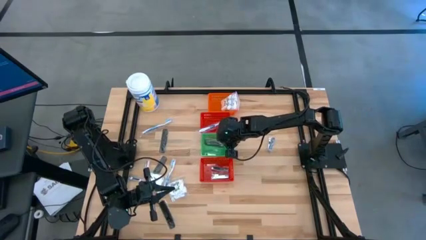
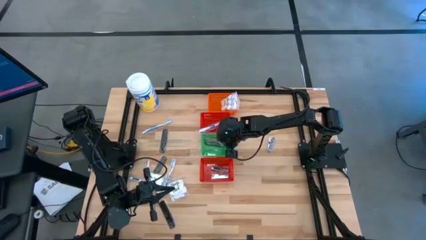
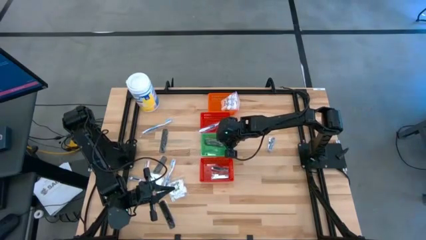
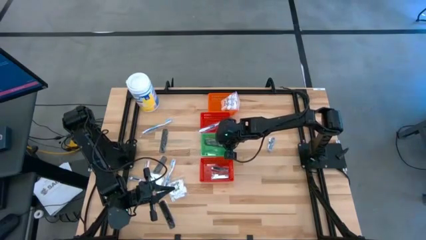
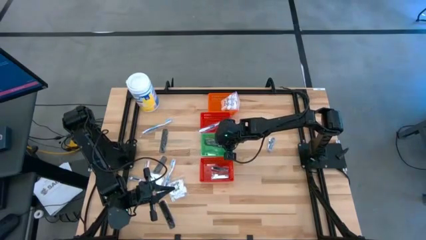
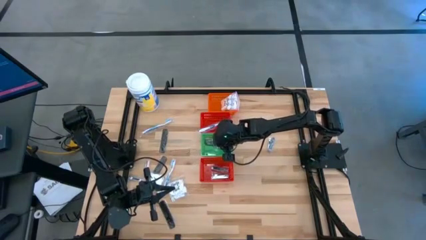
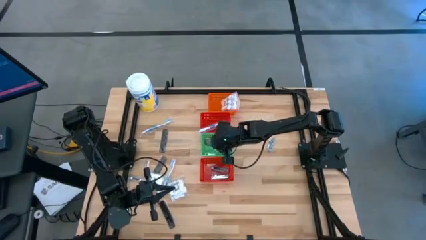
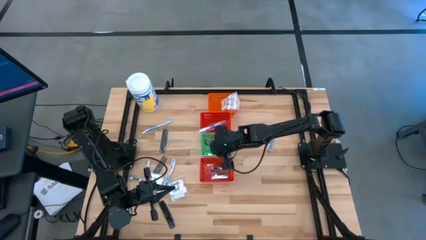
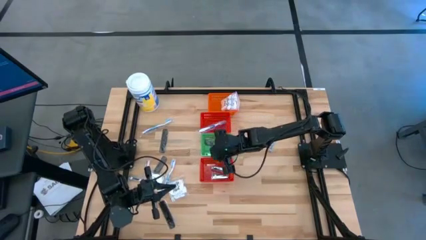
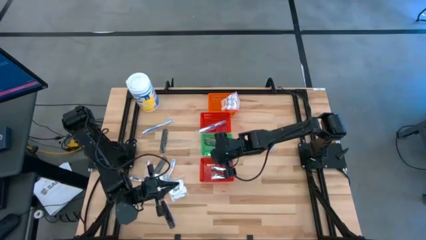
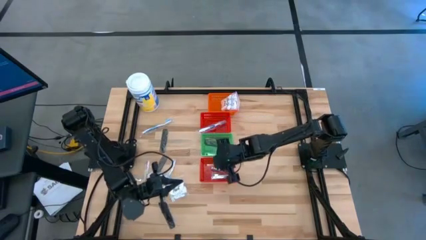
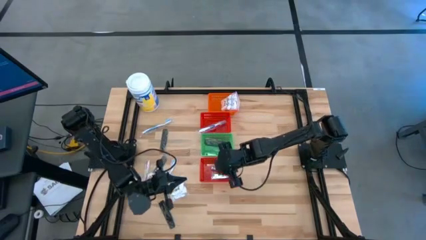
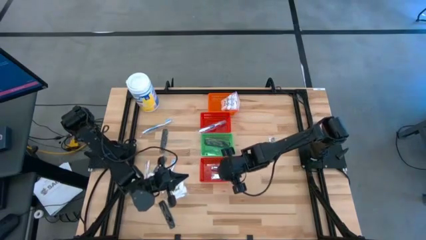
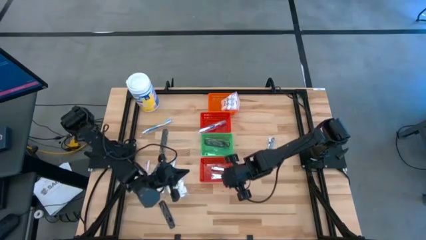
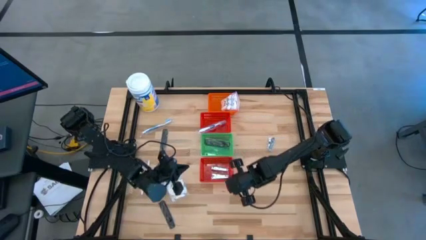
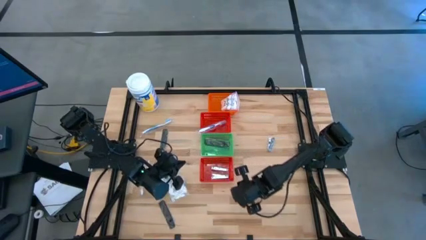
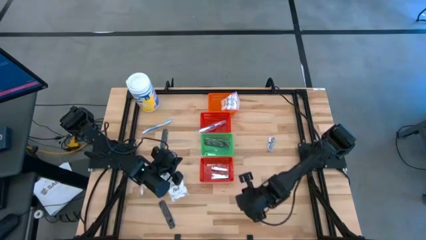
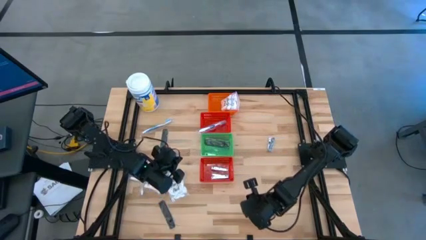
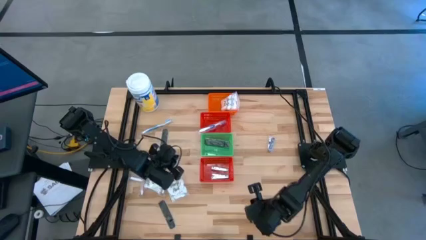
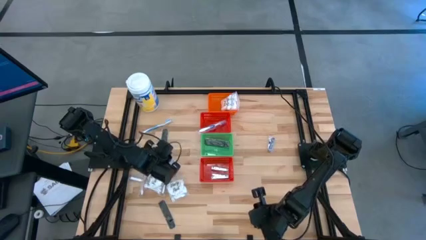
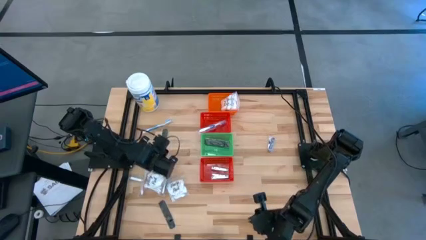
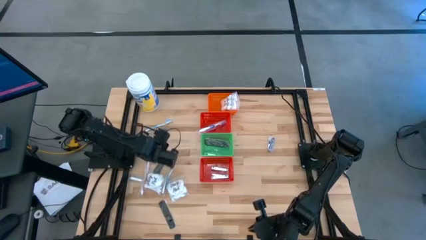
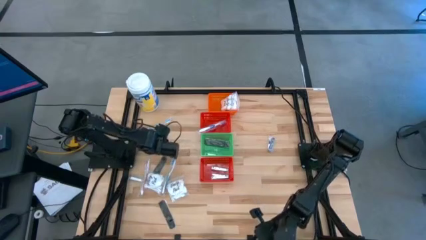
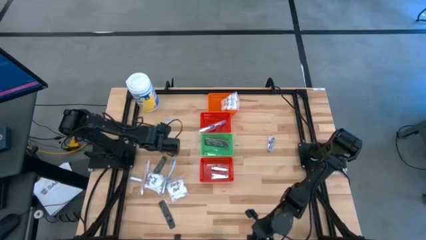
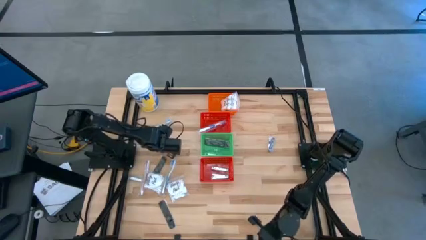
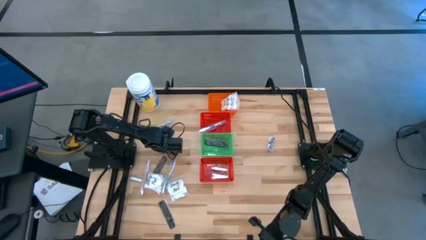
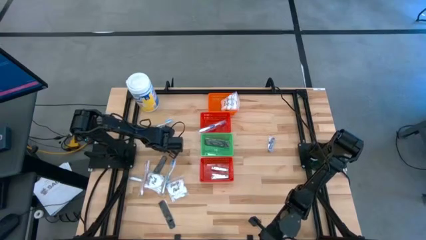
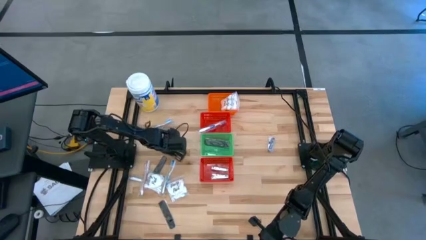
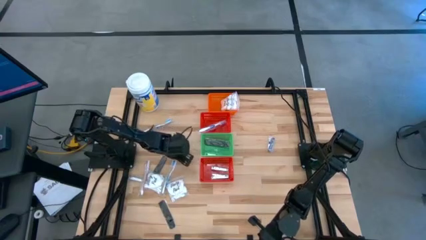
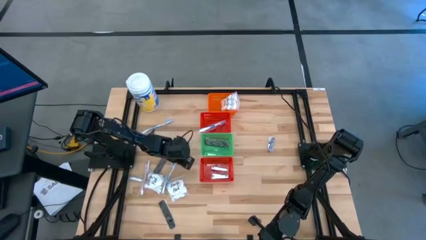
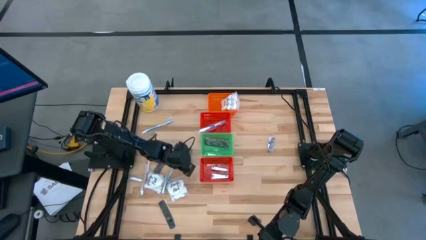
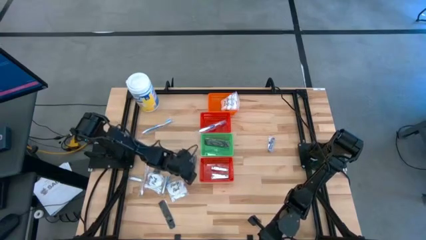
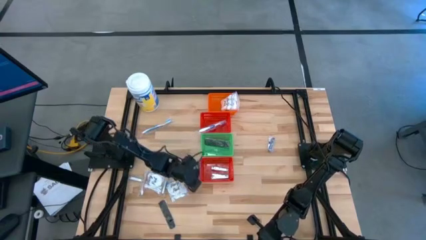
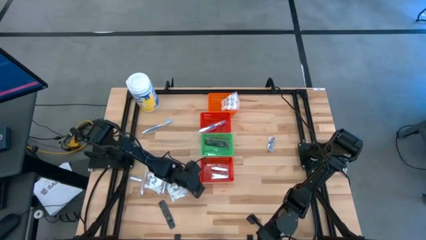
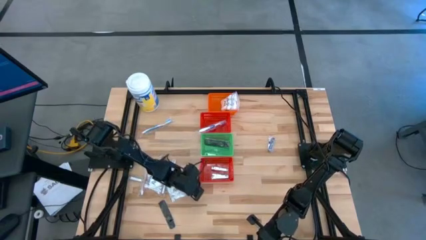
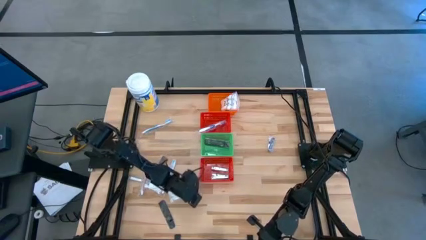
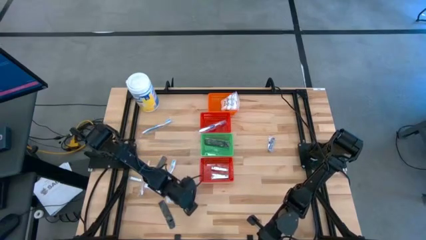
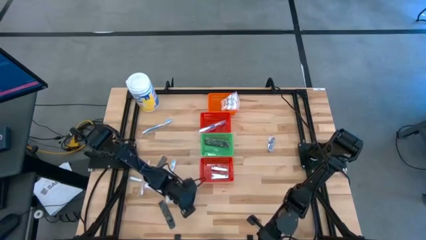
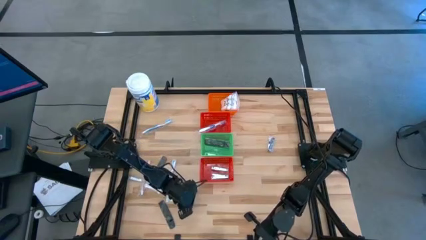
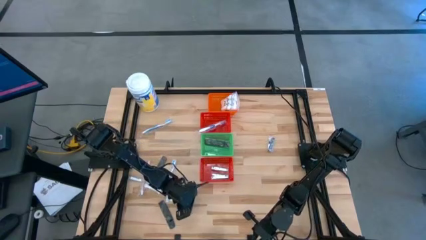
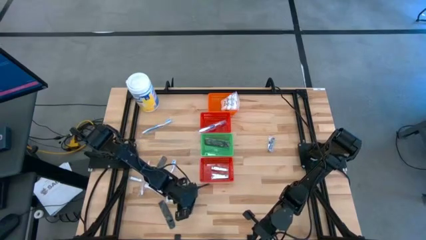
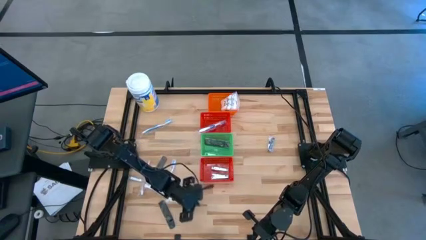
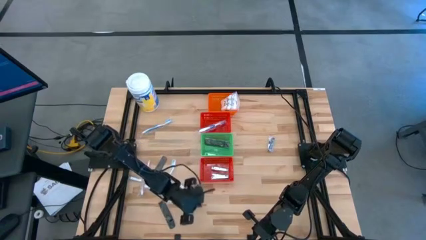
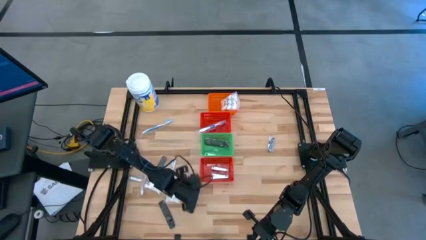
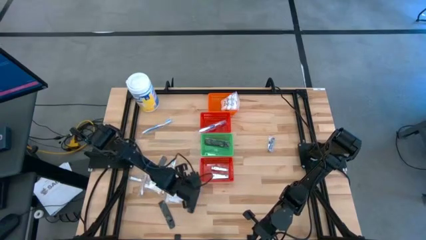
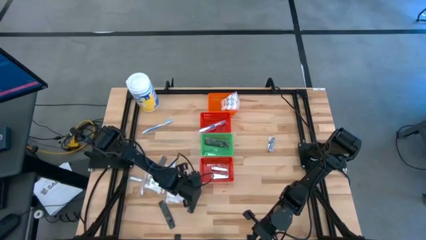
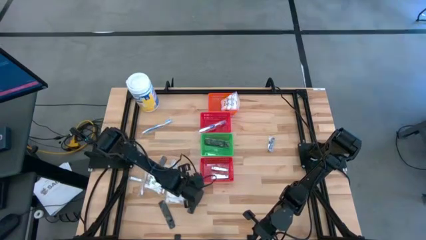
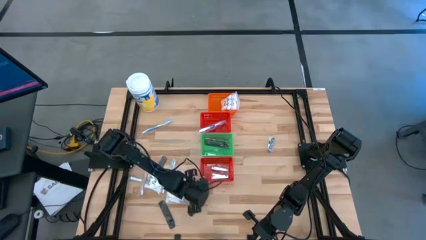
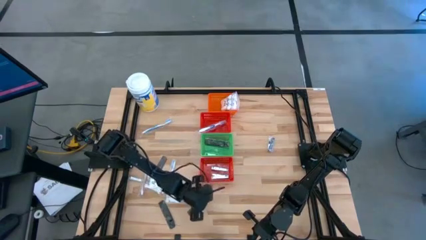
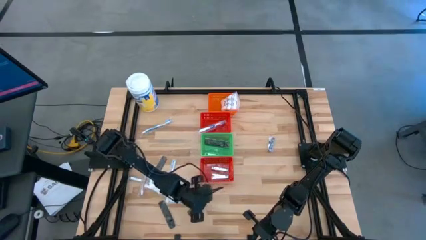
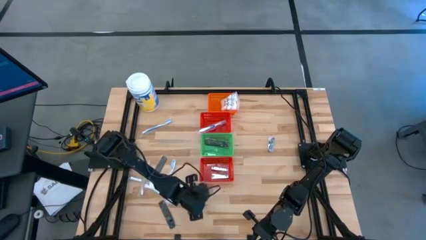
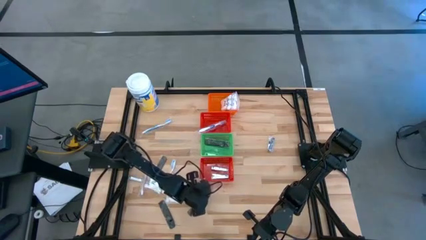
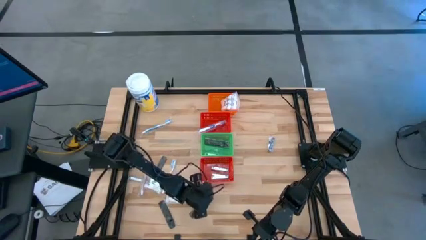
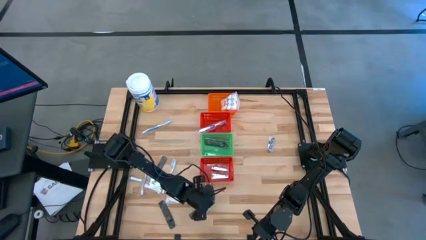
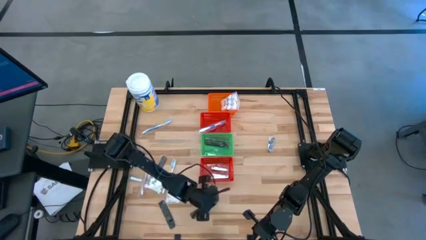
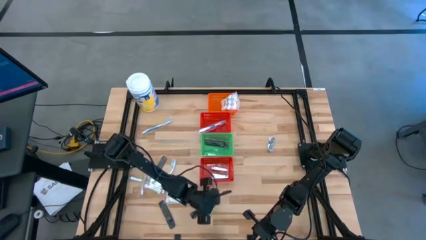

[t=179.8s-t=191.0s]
Task: Pick & Place Travel size toiletries
Put the black comb into the green basket

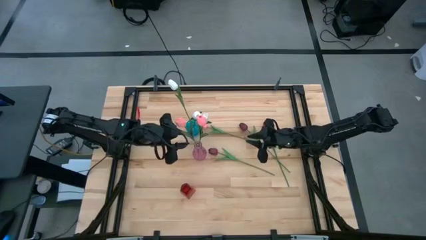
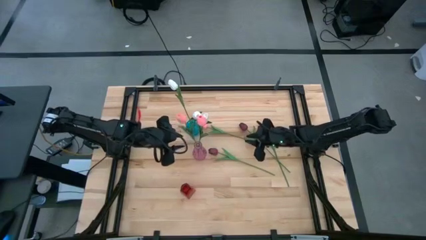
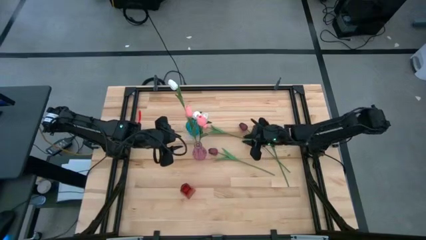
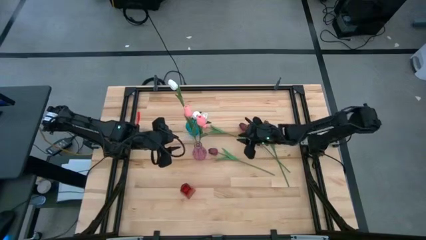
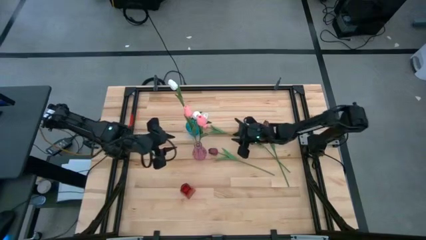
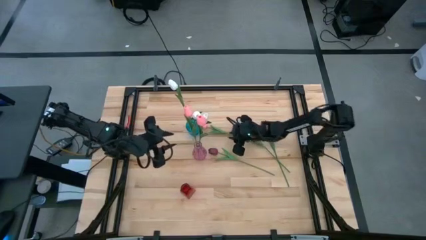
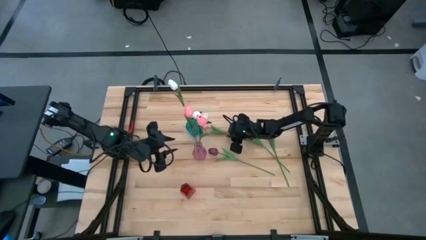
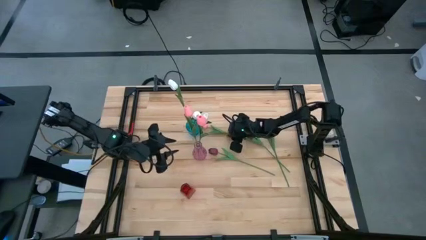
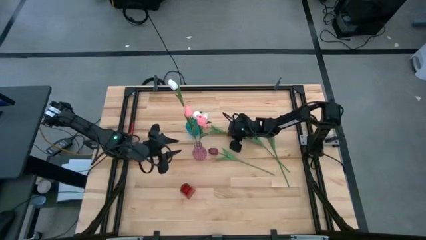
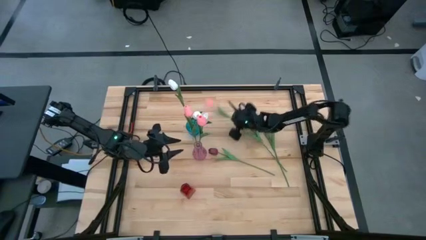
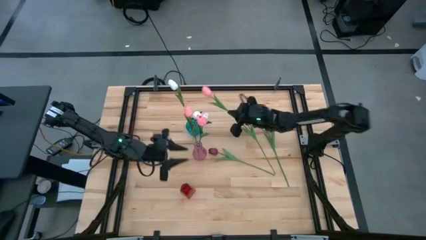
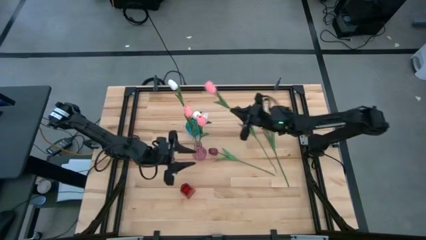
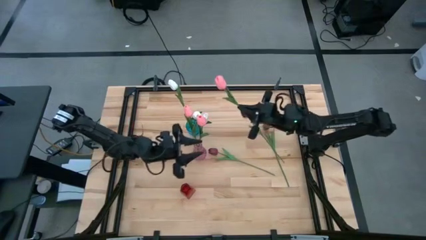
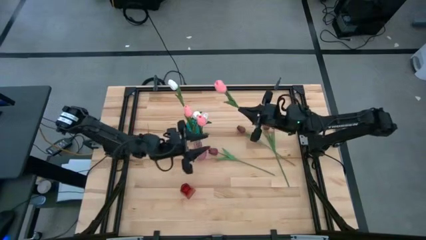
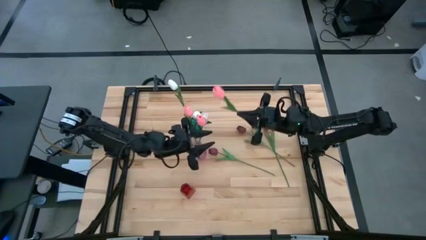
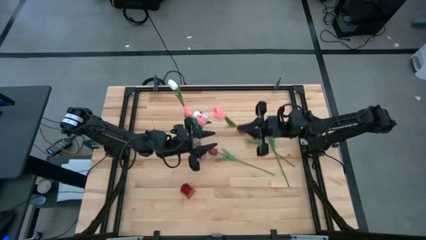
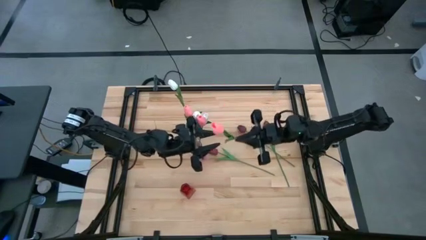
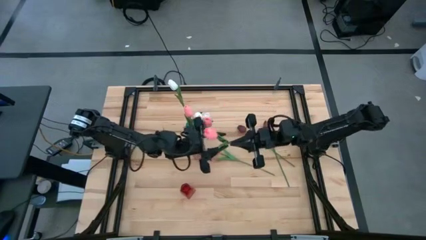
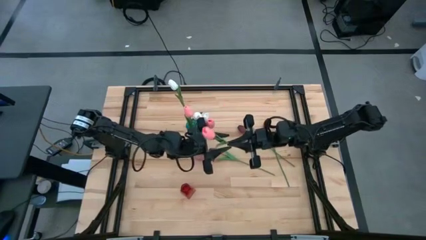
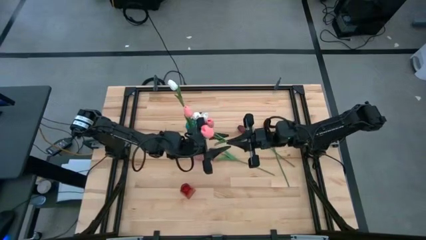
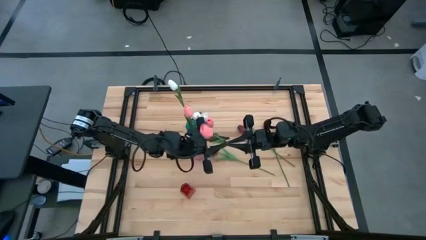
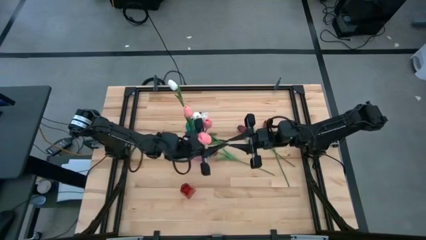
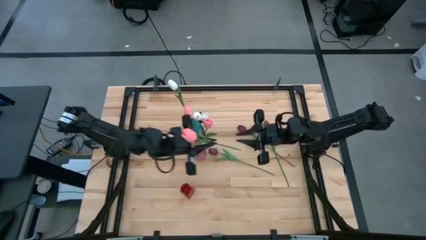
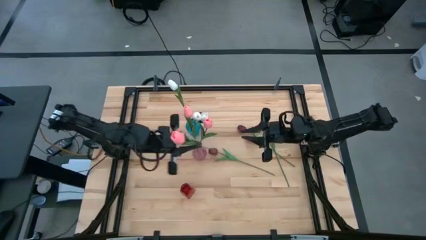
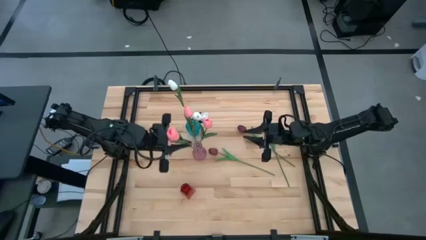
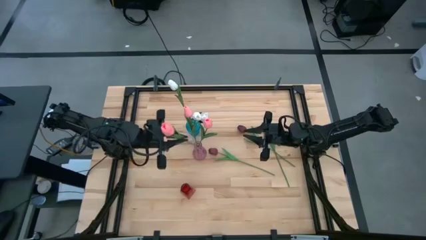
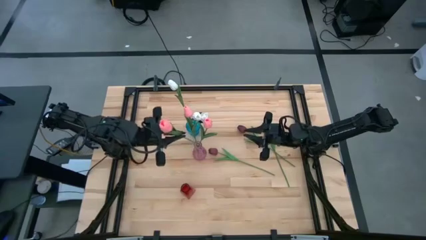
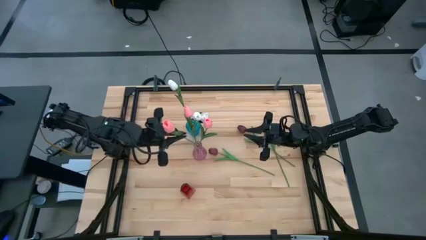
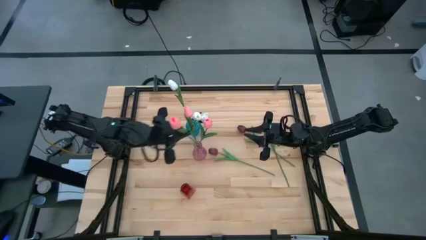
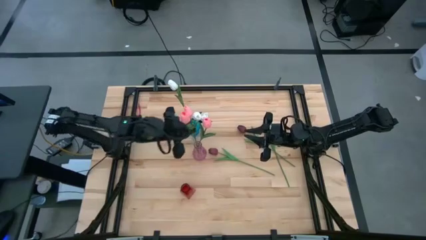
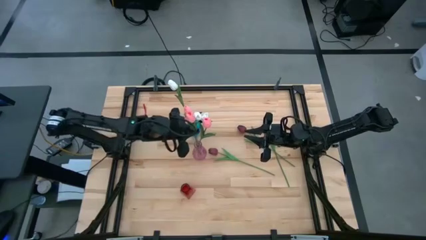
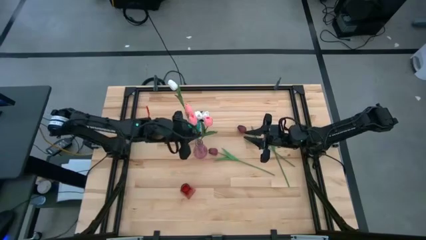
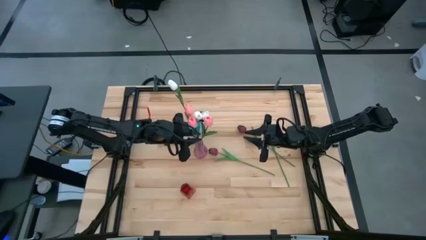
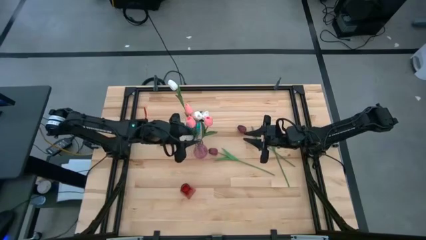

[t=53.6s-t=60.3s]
Task: Sort flowers into vase by color
Put the pink tulip into the purple vase
